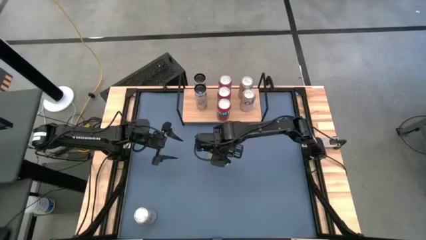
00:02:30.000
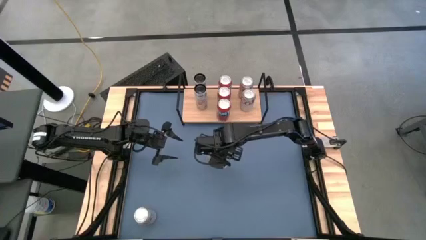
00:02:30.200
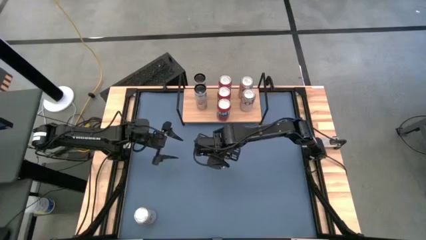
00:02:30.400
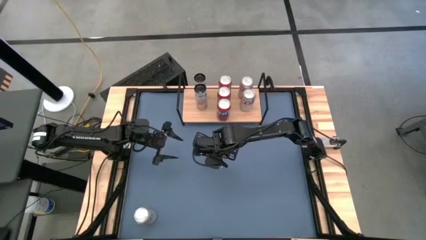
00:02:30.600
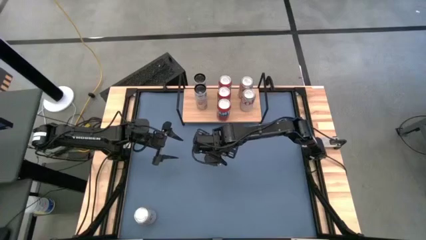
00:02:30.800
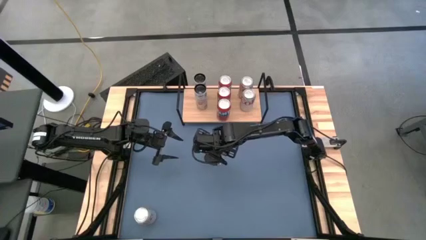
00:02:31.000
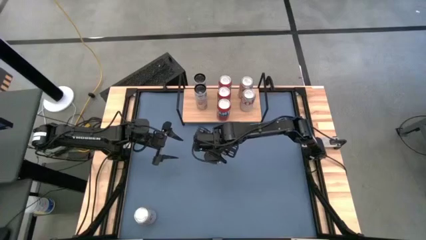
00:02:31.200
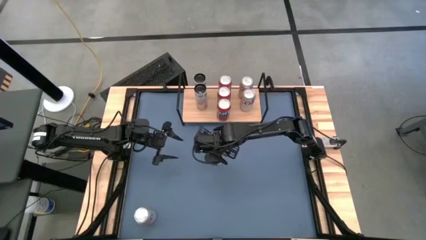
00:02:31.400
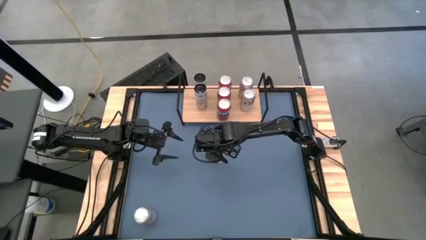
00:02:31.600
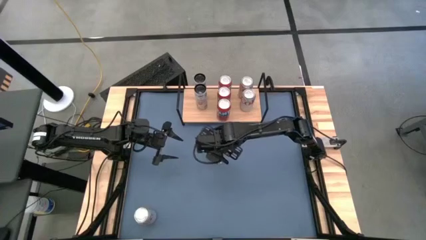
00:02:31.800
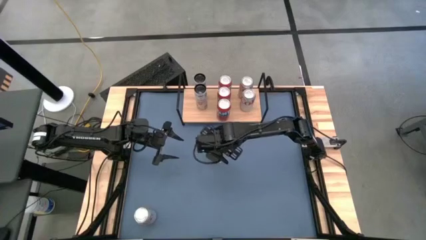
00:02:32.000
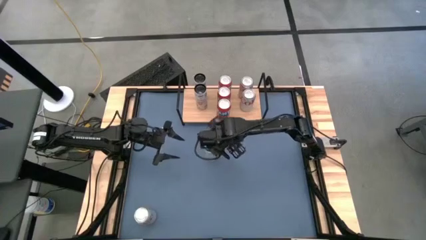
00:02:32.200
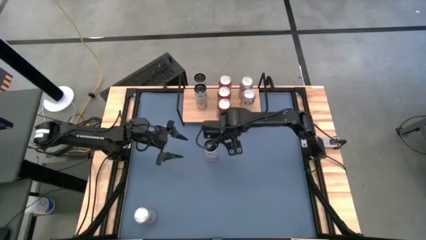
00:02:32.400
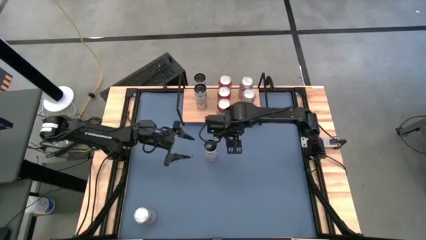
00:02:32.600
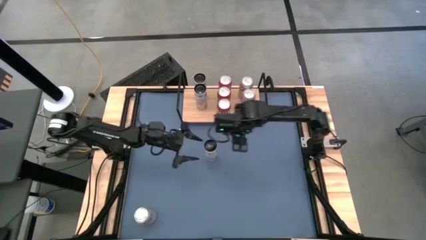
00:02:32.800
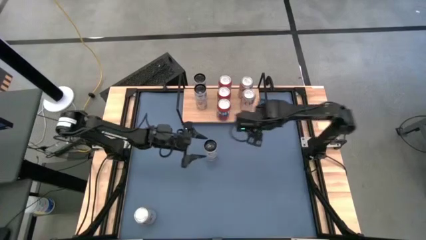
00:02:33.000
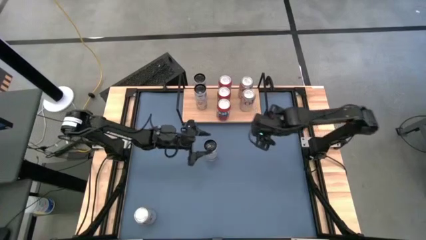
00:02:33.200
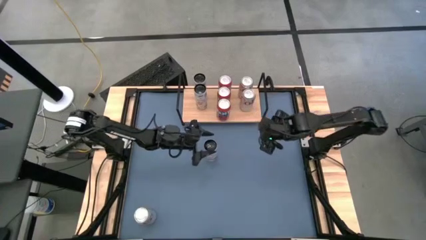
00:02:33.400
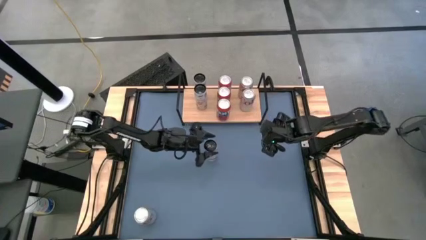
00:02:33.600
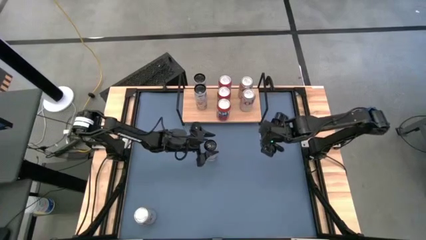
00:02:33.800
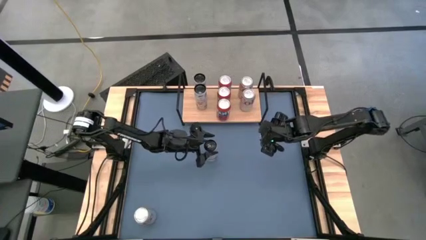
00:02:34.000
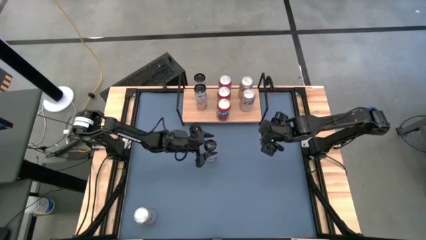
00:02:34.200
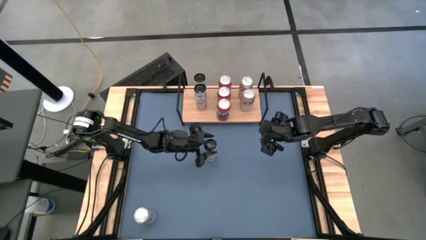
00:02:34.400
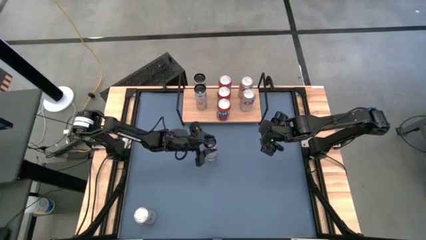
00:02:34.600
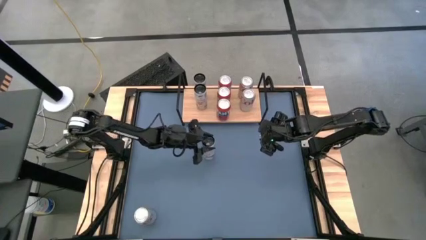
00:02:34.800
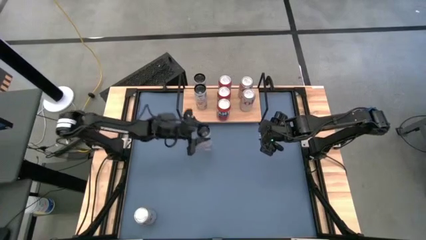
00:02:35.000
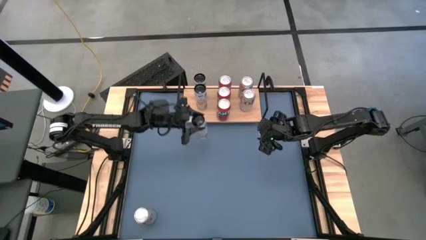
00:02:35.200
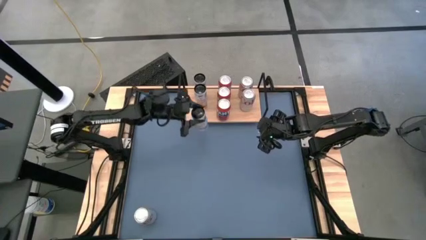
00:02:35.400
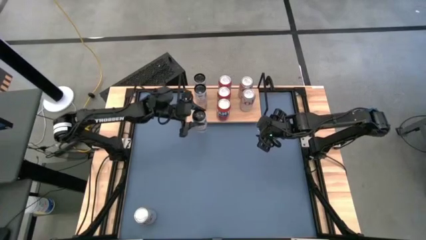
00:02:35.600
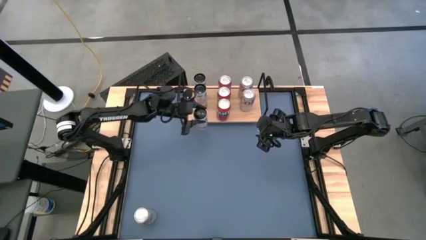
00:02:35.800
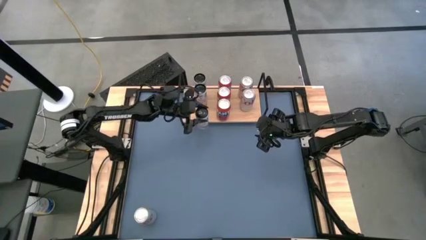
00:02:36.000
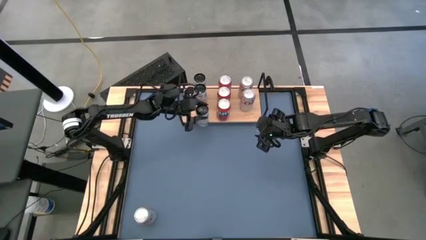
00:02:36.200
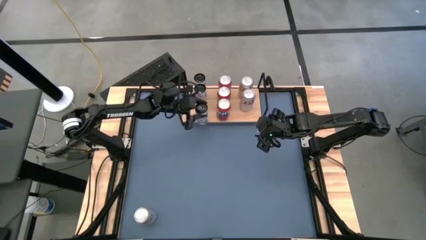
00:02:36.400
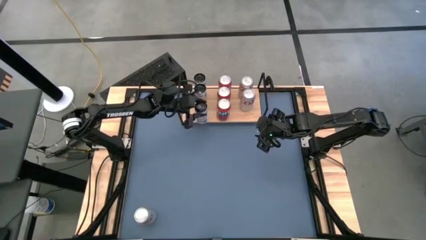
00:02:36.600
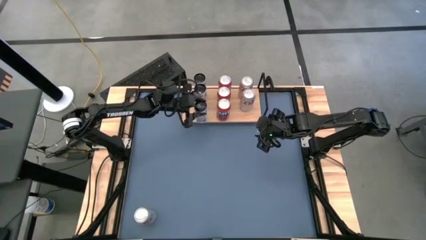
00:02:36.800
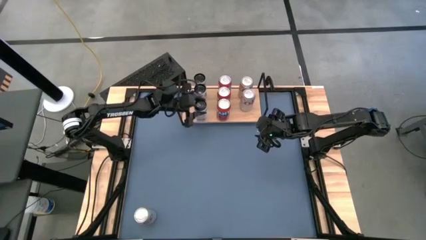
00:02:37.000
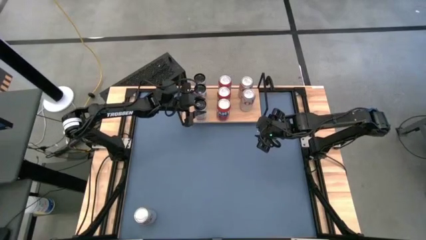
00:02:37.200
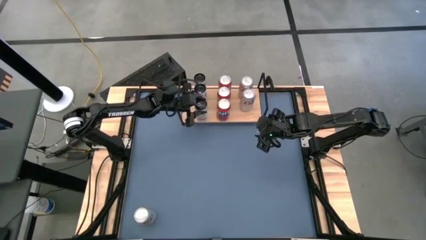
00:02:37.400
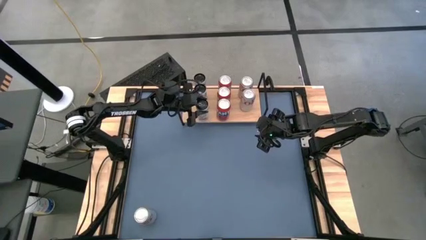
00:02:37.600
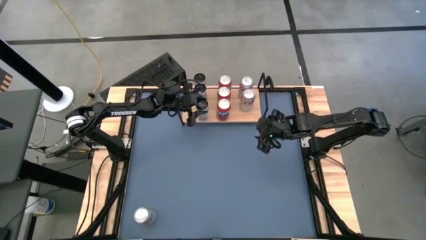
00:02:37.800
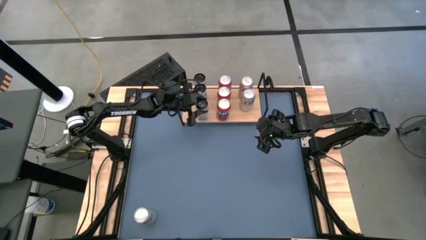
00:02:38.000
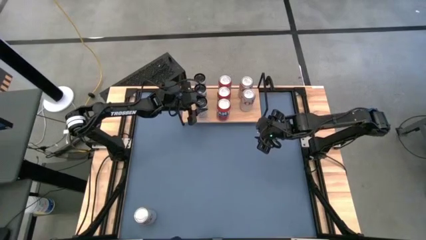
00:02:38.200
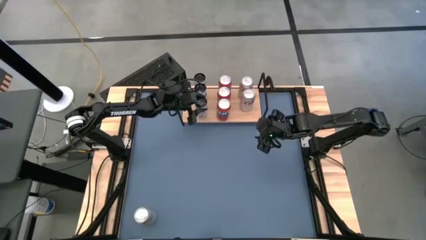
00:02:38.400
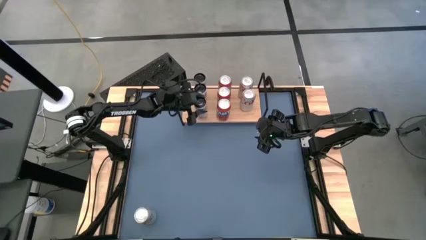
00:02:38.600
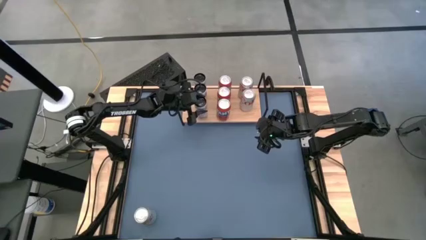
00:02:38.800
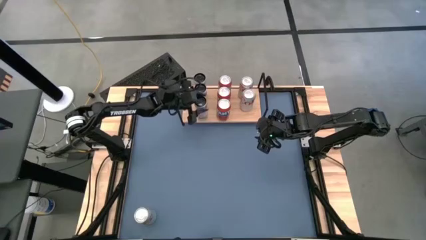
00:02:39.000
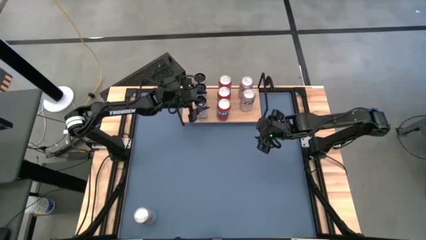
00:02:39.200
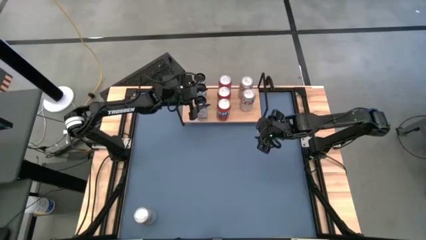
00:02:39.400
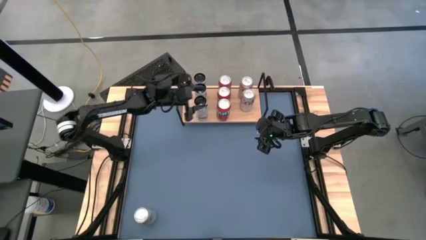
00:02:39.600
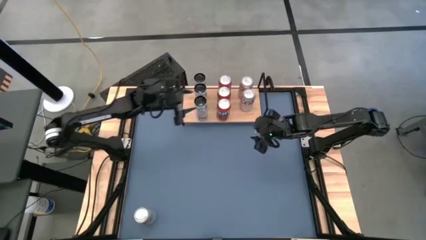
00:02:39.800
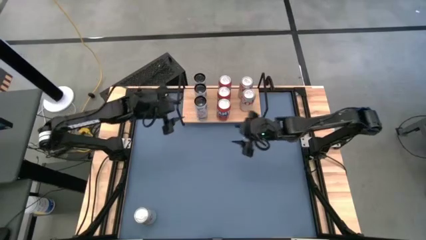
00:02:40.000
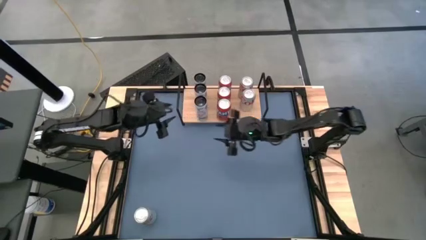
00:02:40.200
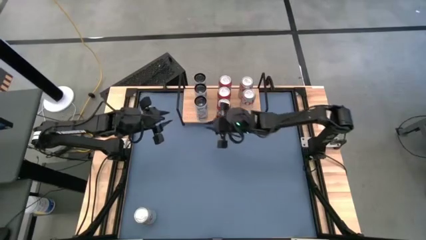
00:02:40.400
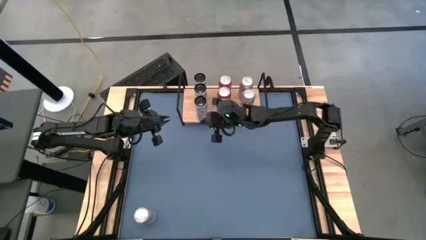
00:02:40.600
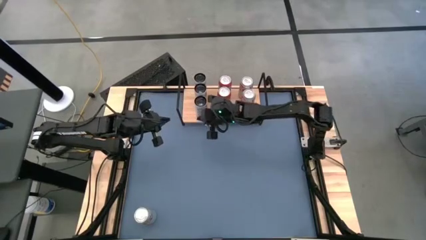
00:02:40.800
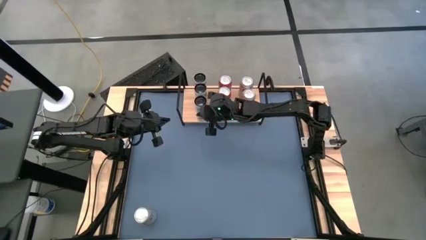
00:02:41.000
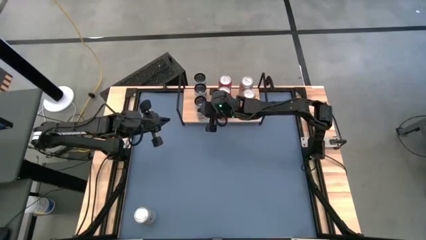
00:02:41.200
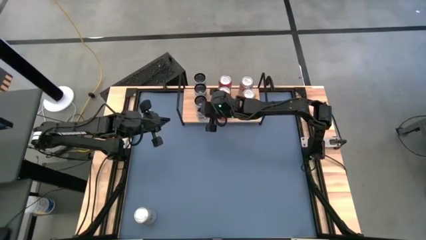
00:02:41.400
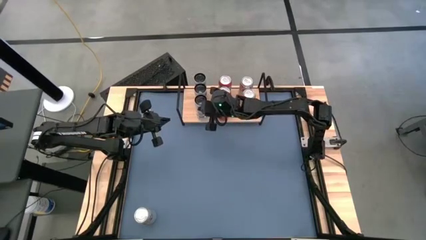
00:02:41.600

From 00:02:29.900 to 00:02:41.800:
Task: Place canned beverage on shelf
Put the black soda can on the shelf aligned with the other black soda can

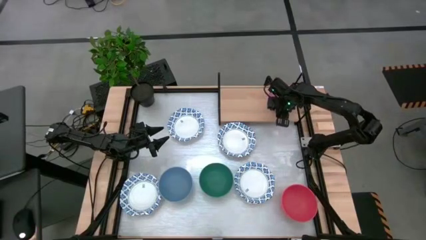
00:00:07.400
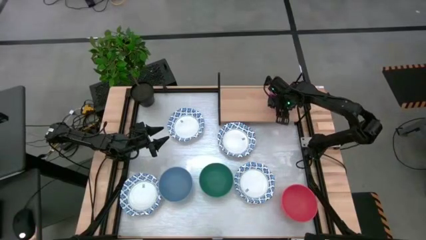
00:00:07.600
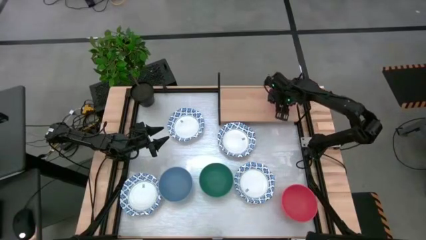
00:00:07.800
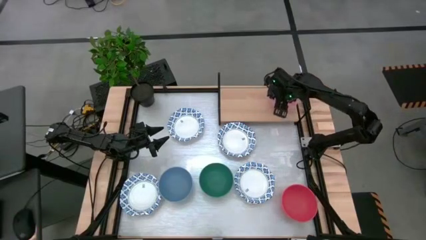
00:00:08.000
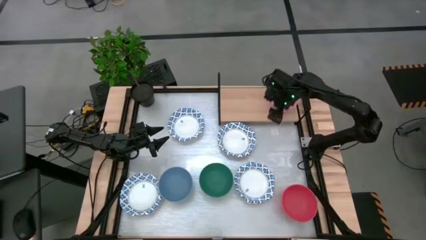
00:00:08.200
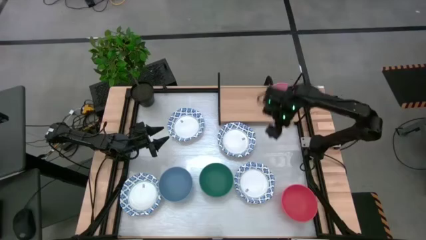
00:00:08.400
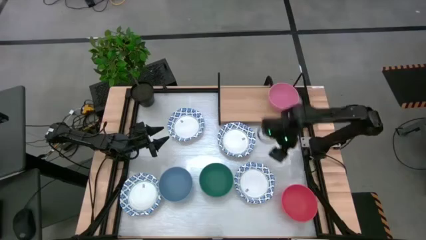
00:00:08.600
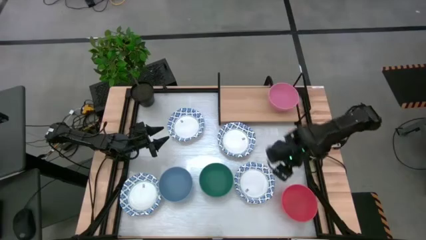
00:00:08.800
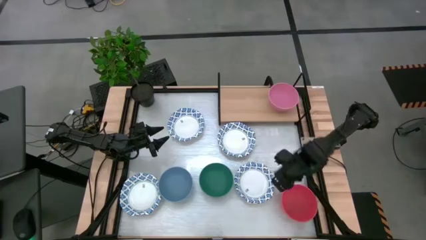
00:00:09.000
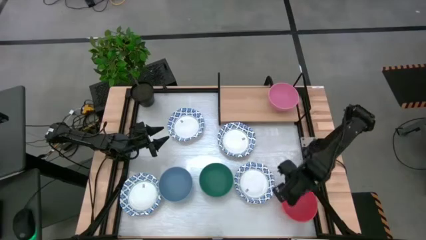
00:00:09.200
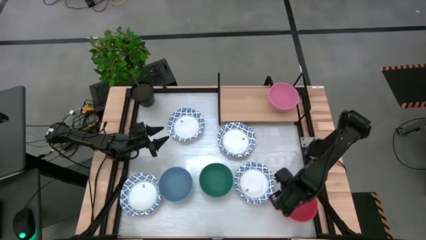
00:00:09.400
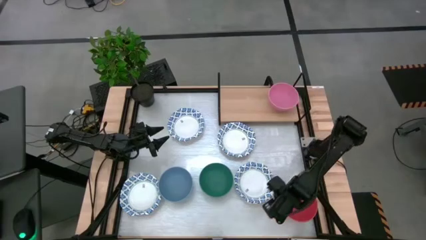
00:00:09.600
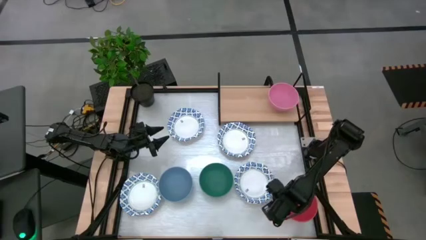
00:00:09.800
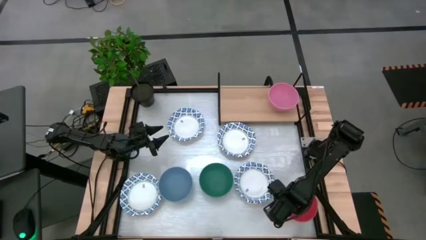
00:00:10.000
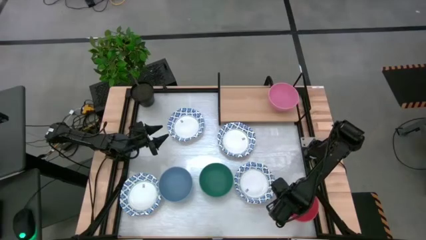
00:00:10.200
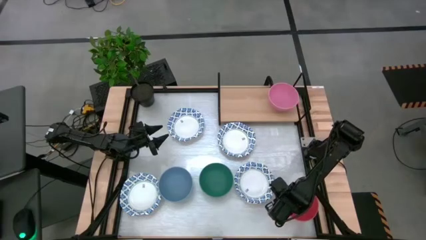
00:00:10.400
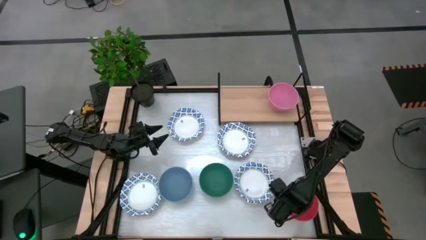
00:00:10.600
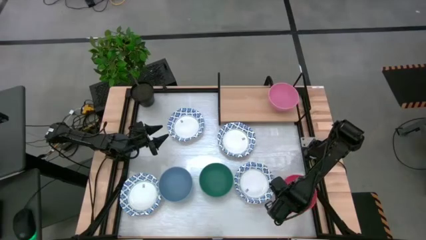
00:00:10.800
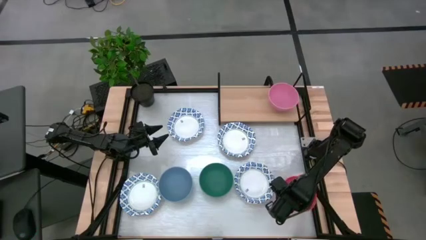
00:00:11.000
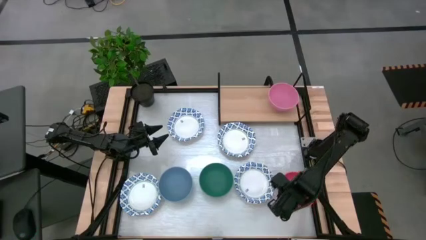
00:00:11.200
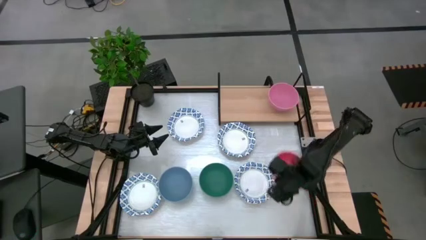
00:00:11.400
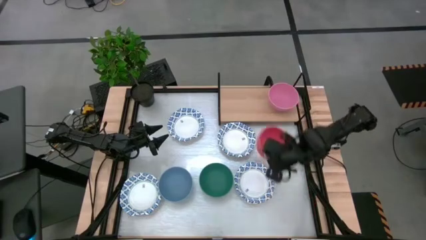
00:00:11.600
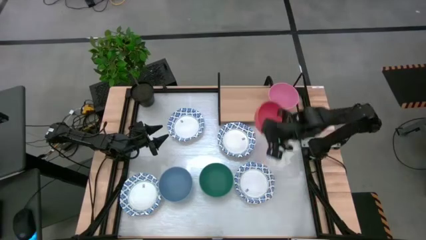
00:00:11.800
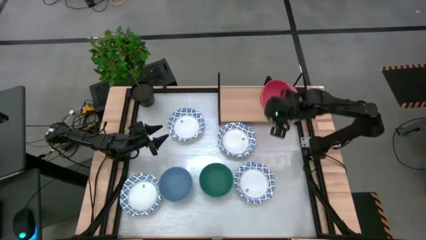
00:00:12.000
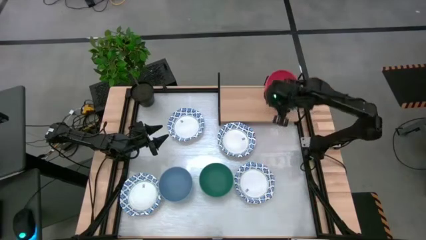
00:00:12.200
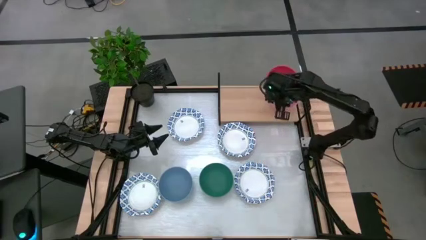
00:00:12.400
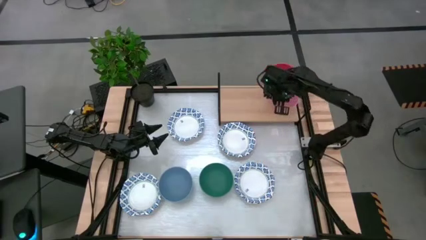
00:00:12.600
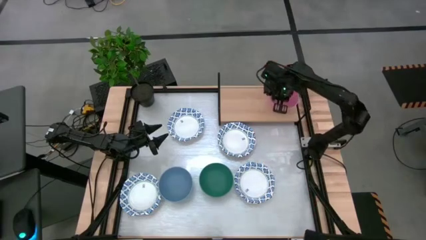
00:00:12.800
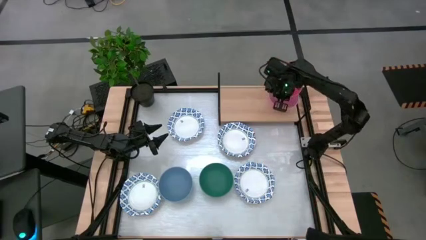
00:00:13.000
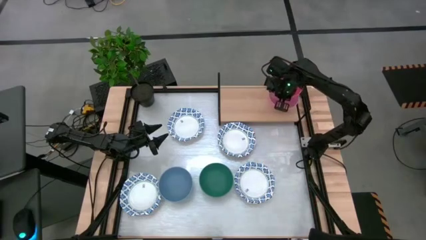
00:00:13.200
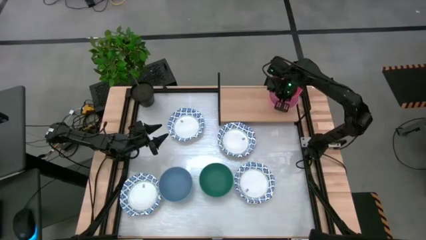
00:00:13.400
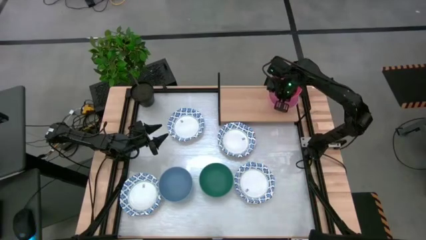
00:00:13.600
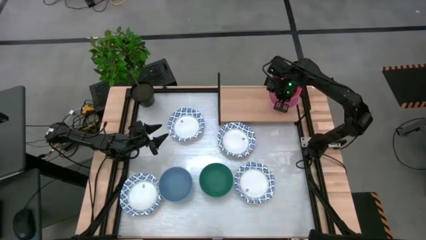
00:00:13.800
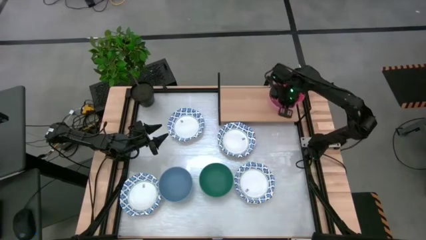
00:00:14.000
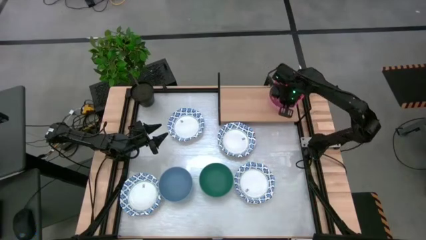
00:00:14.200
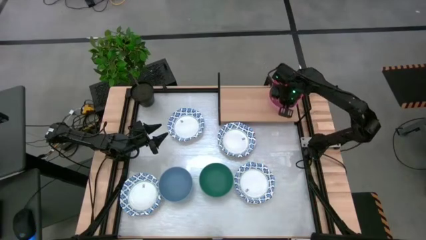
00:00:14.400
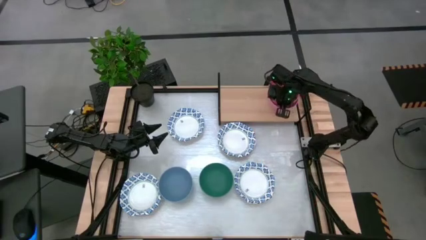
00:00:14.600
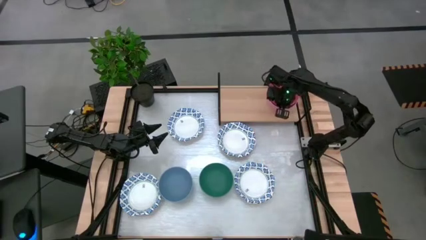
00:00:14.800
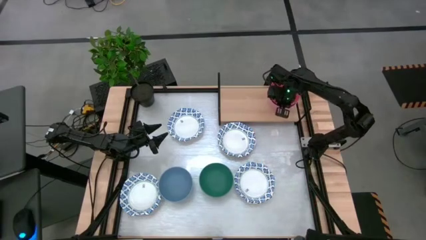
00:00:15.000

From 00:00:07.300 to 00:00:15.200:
Task: Place and stack bowls onto a shelf
Stack the orange bowl on top of the pink bowl on the shelf
